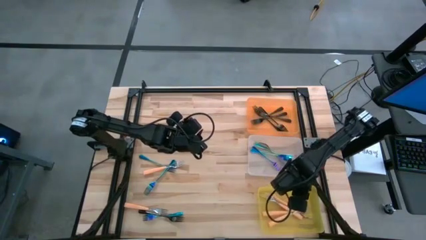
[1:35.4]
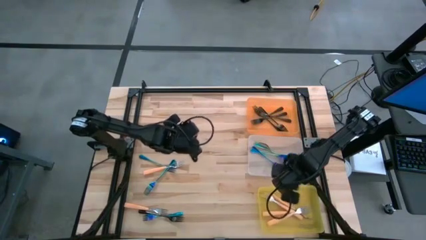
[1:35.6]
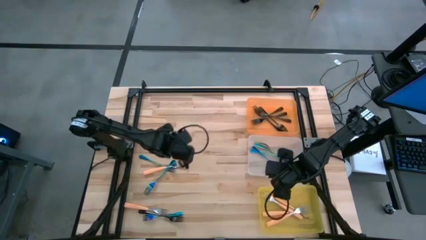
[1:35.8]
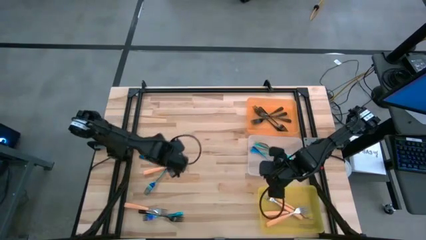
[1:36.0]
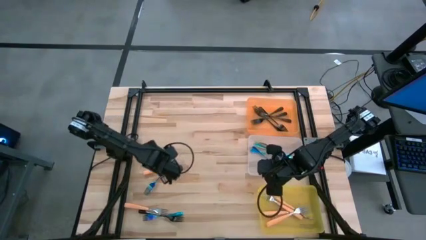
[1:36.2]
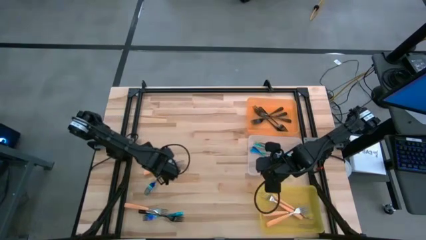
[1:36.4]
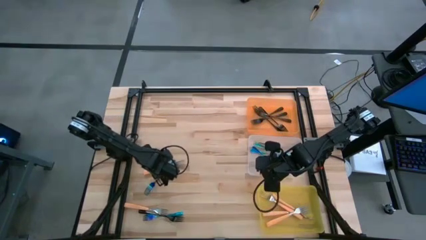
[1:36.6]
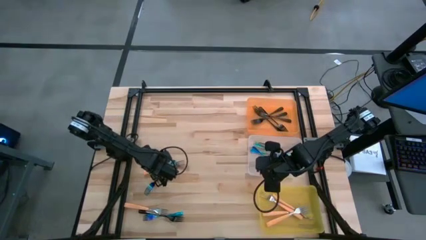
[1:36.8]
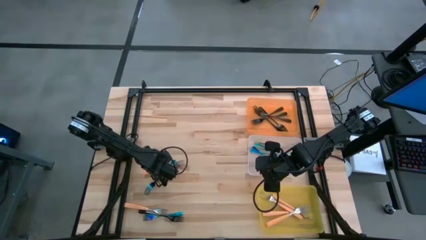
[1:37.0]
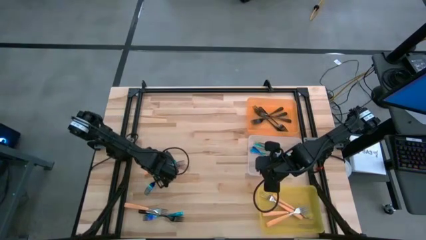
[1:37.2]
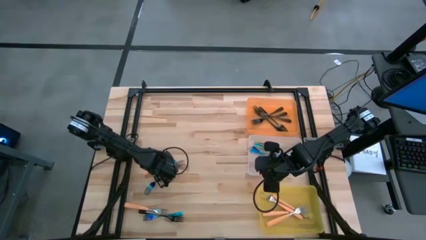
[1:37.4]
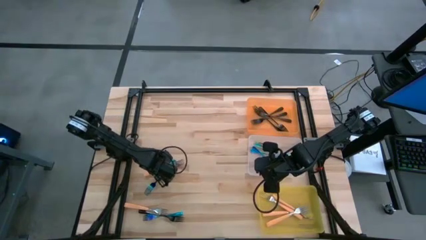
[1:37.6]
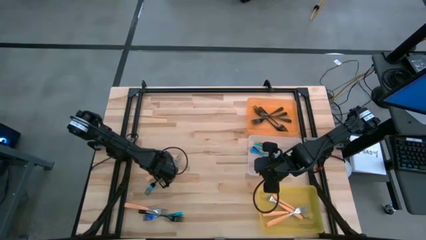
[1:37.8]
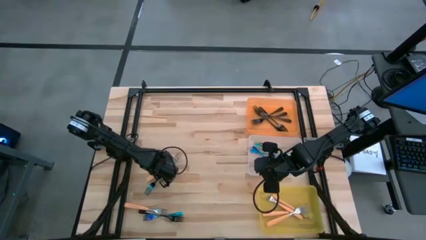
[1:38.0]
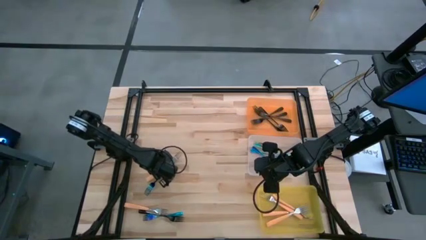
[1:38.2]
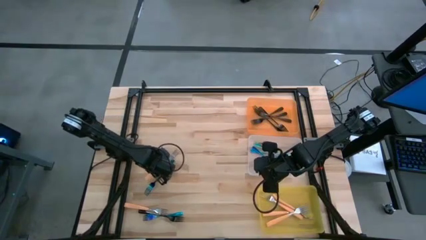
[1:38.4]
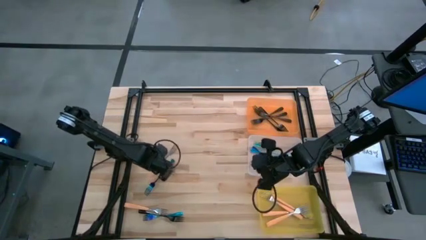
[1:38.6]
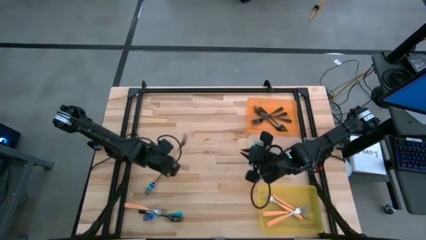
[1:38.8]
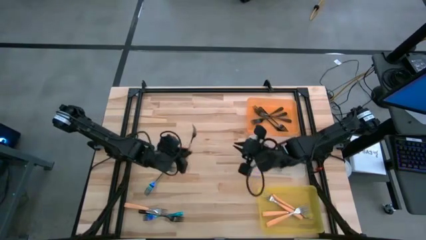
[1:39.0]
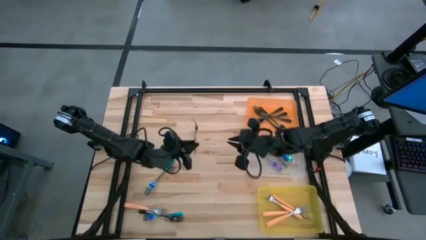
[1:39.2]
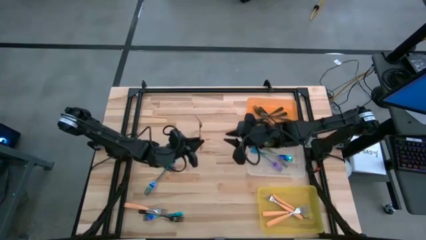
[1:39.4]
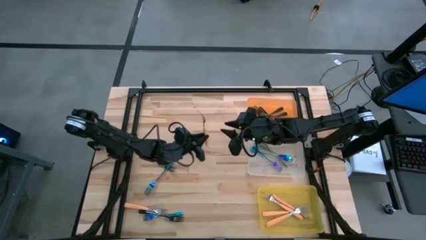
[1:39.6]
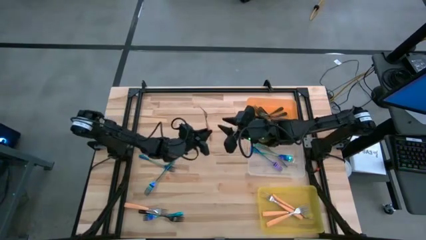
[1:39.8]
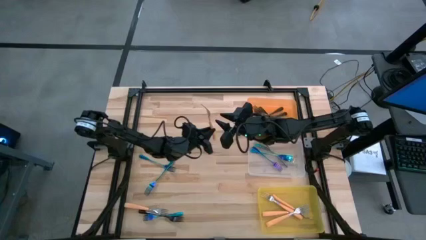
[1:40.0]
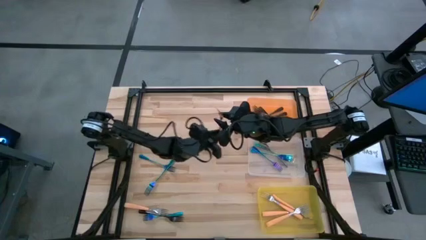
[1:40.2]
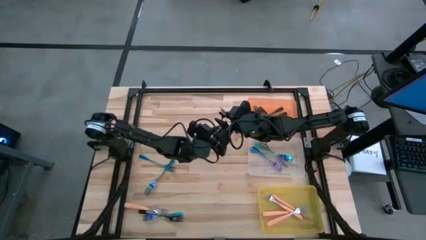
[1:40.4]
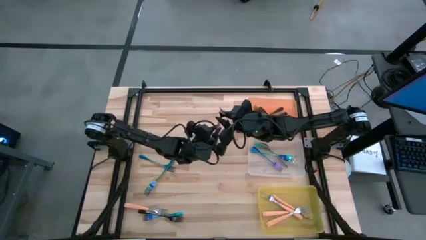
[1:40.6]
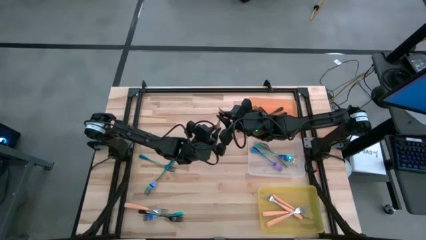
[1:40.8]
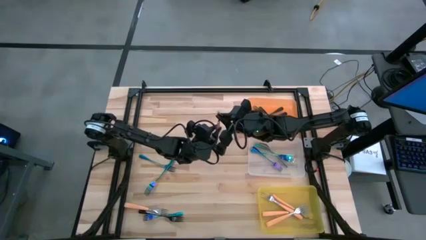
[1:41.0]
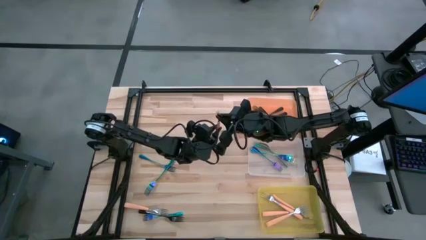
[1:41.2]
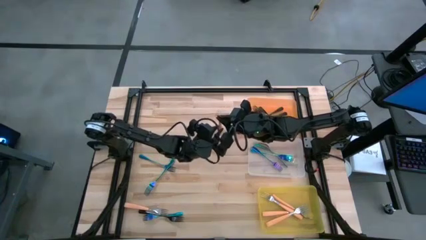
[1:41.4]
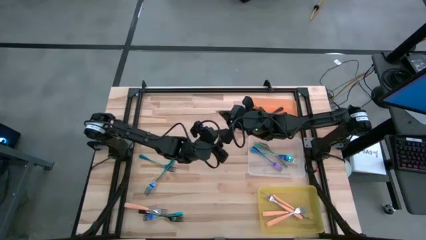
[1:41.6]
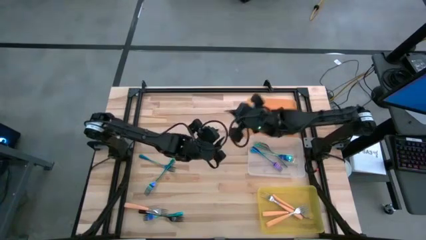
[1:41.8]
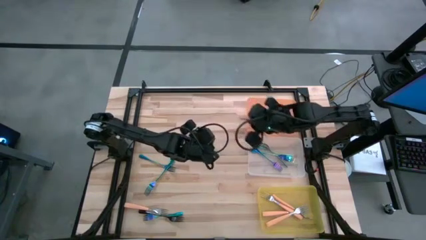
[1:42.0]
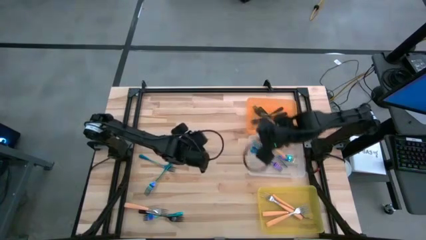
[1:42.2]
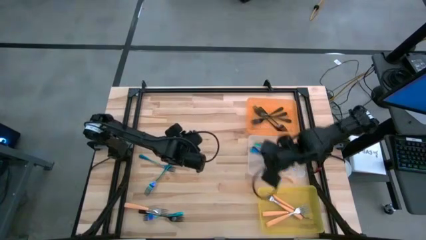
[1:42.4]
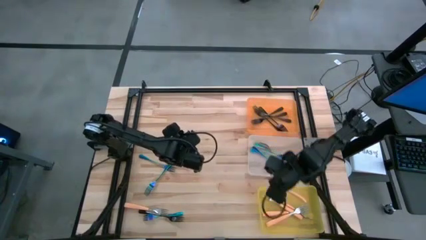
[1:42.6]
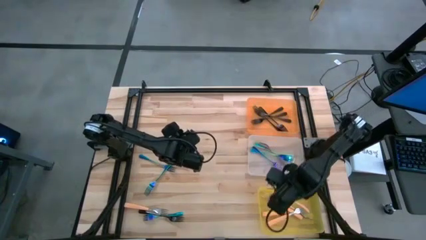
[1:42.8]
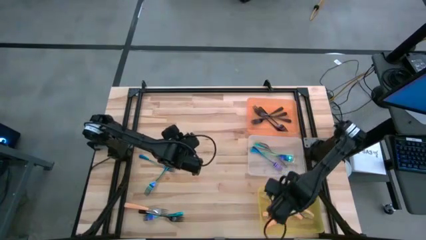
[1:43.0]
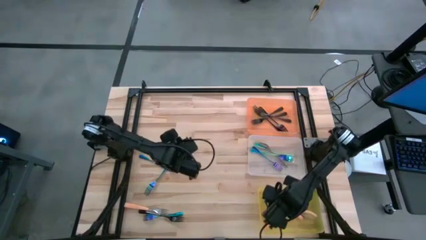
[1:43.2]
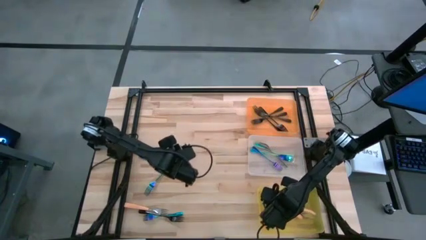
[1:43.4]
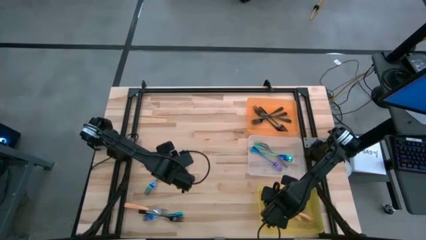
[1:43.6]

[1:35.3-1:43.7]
Task: Sort silverware by color (type)
Put the orange fork into the yellow bin

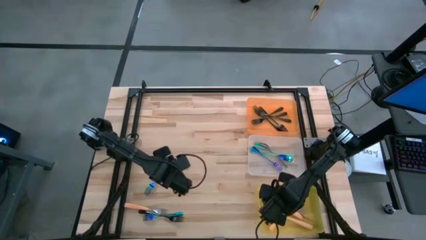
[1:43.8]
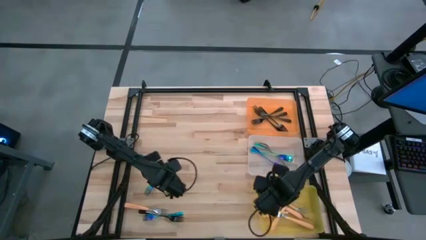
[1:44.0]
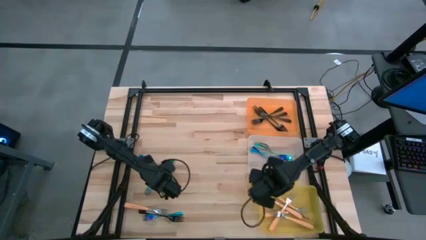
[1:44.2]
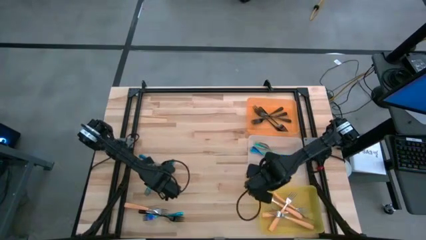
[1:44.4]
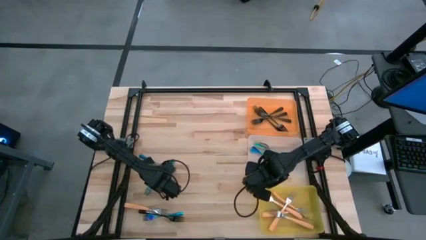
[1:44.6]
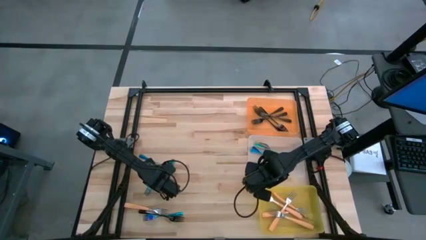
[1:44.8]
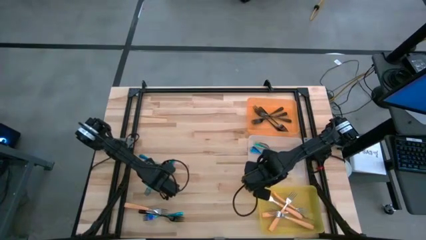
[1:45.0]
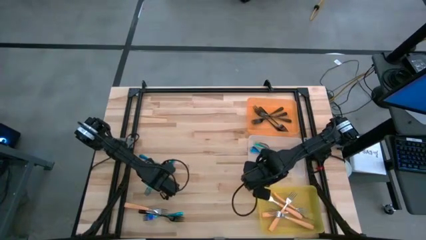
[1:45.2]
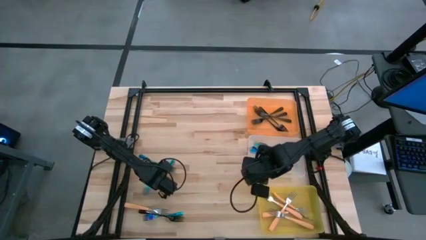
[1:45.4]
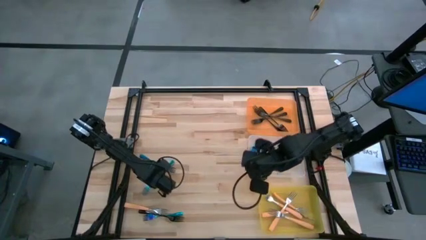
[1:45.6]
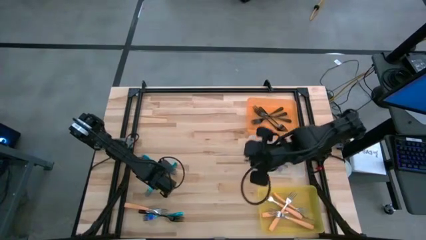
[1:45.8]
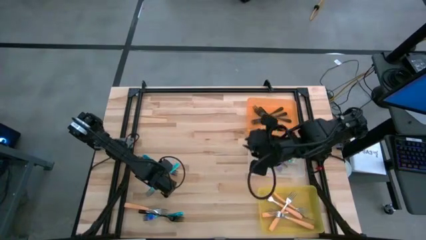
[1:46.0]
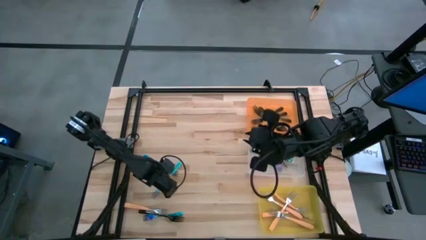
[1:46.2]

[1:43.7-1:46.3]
Put the blue fork into the transparent bin

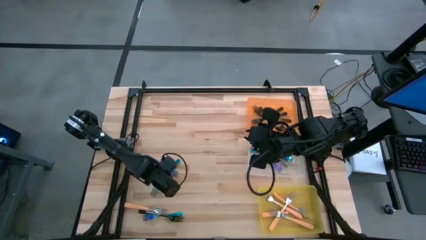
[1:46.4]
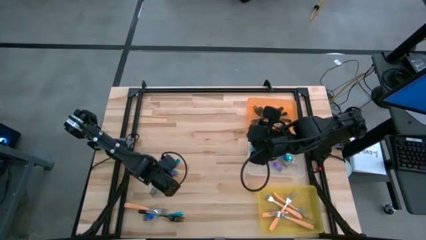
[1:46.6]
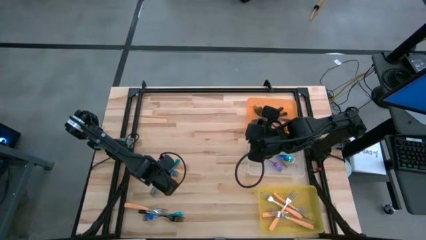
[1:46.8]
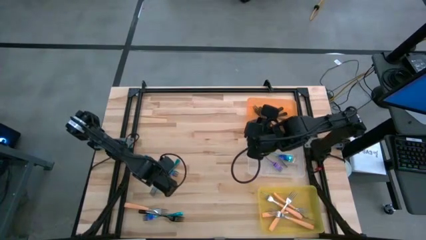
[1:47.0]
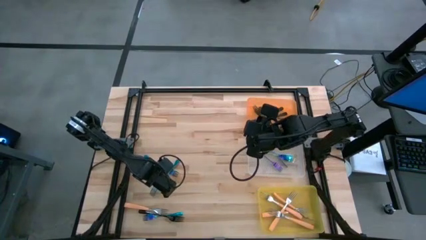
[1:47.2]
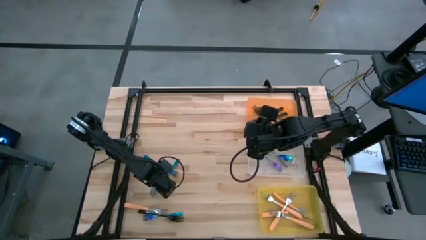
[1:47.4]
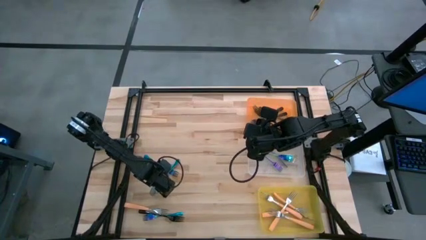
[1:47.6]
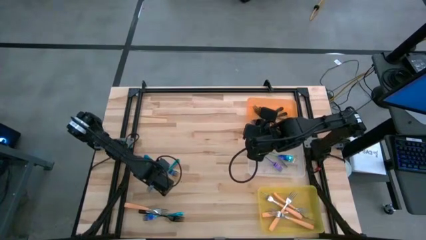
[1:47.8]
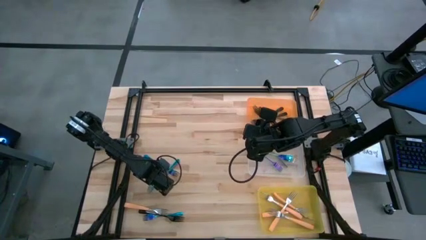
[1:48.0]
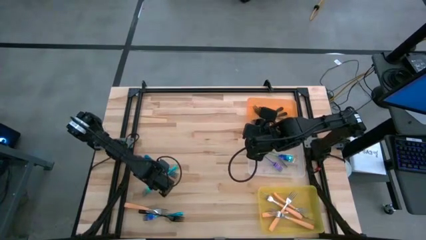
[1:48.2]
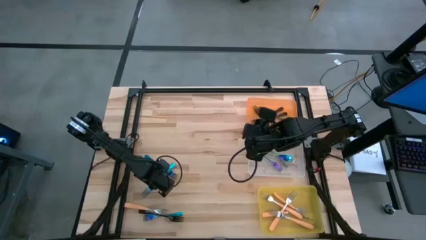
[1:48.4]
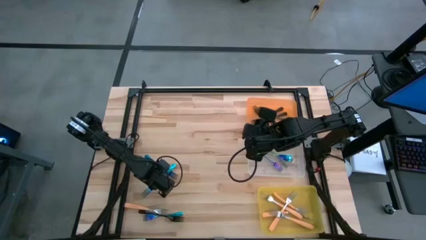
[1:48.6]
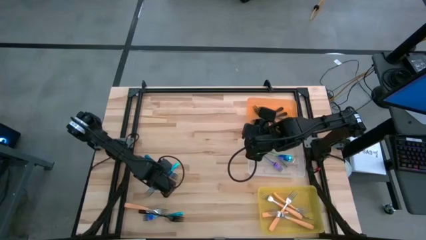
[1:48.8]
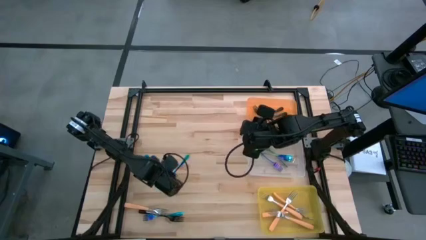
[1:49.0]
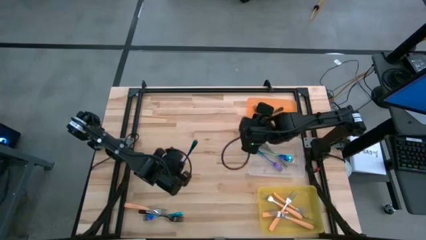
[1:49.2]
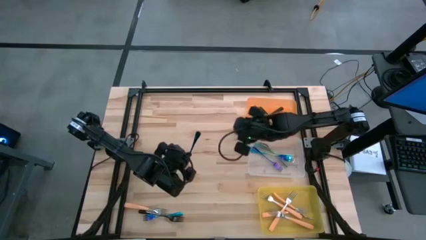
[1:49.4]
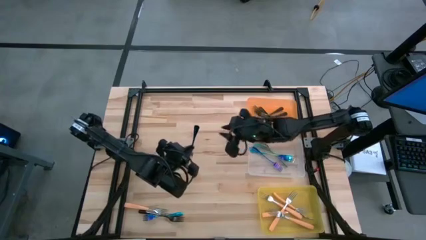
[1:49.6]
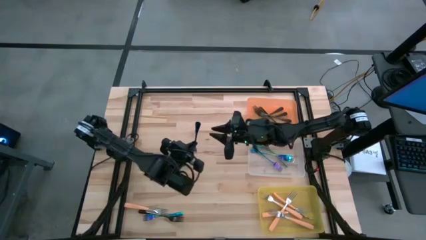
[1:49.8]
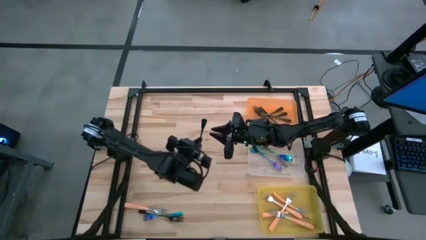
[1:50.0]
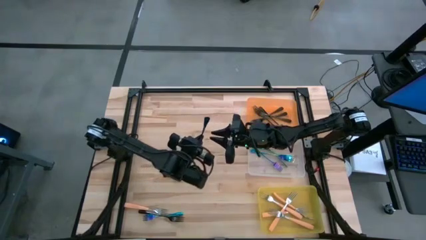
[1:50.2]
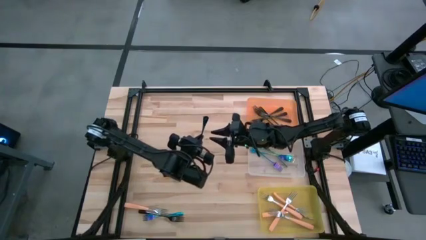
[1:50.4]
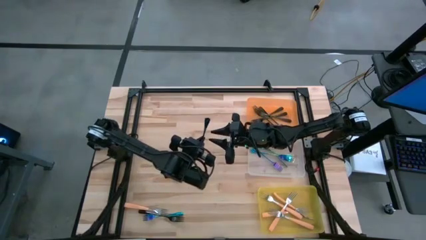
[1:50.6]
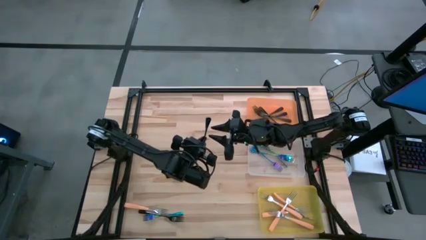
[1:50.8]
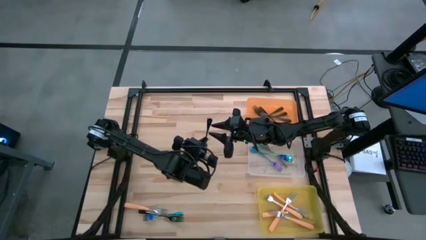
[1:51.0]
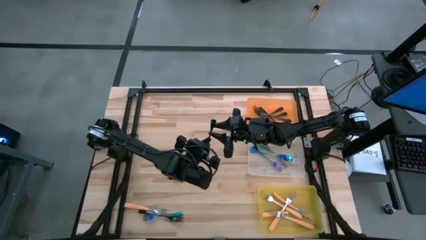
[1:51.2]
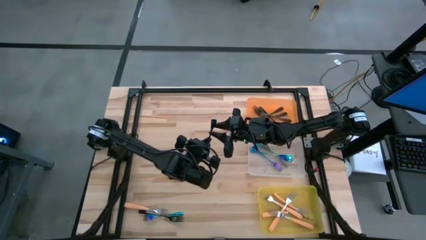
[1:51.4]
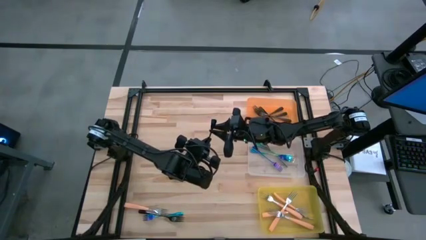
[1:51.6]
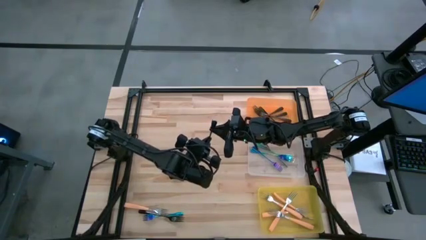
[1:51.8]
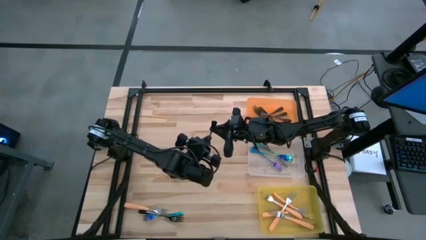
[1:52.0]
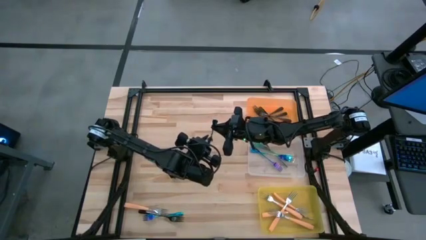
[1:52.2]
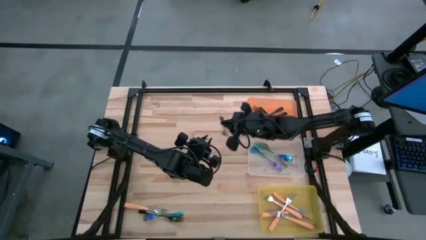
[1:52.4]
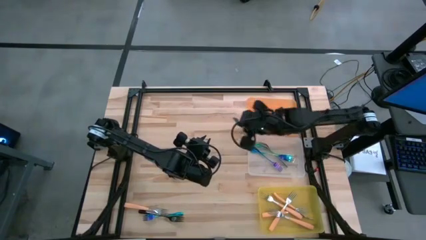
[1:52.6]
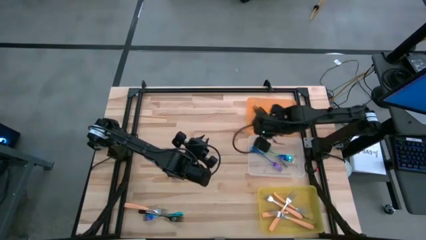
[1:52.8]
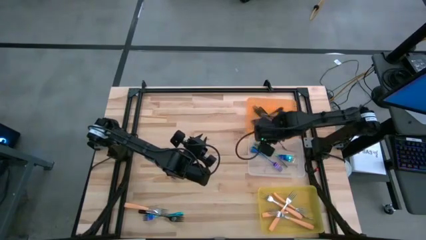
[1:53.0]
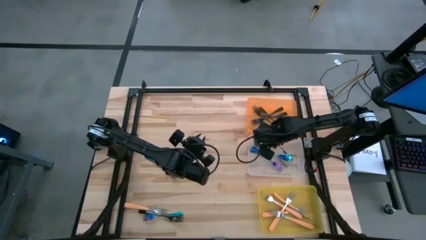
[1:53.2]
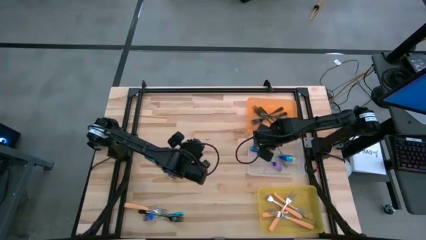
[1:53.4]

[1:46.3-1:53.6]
Put the blue fork into the transparent bin
